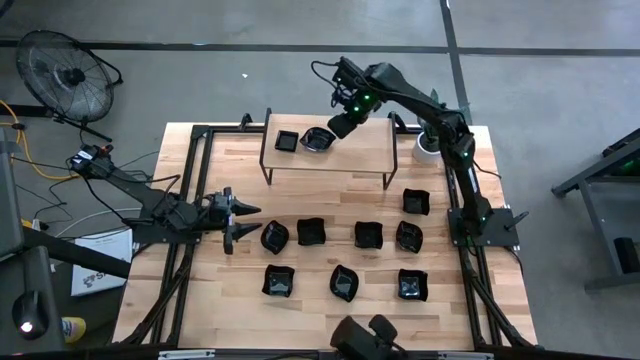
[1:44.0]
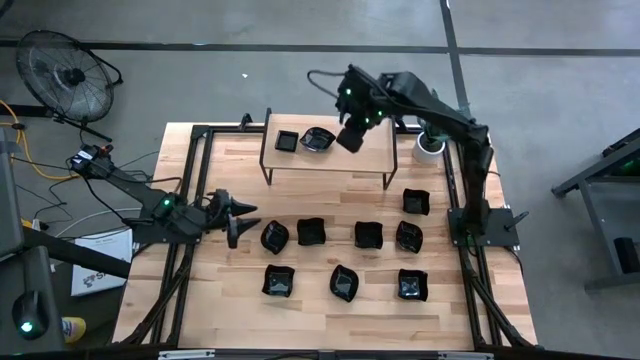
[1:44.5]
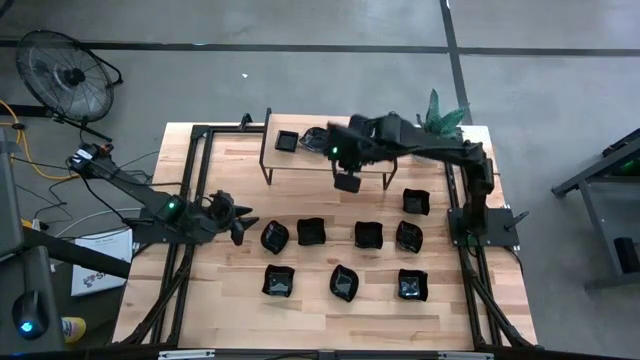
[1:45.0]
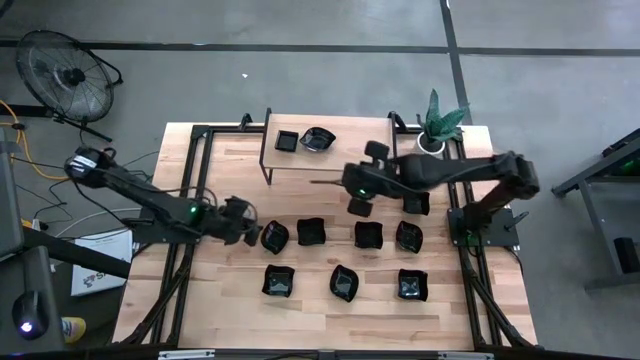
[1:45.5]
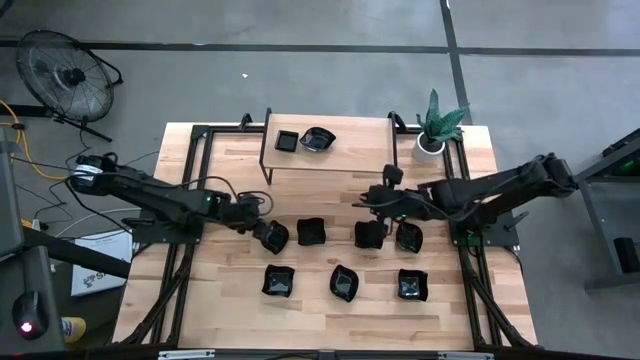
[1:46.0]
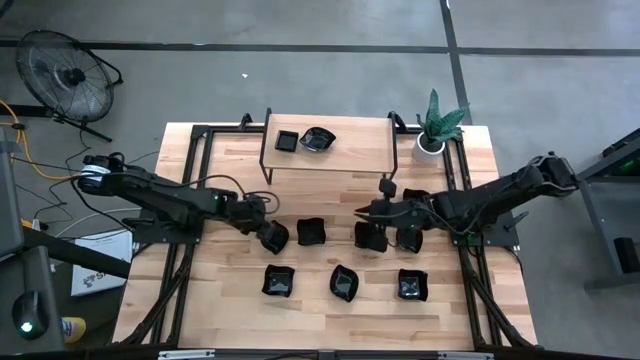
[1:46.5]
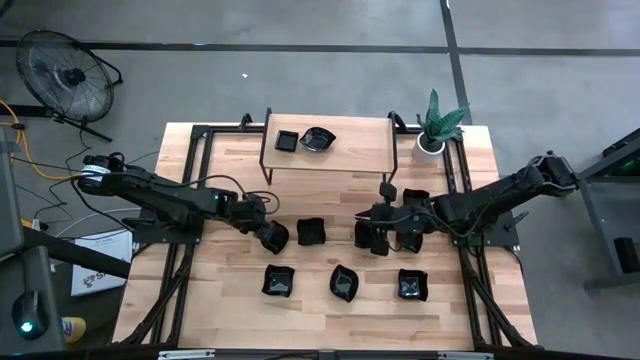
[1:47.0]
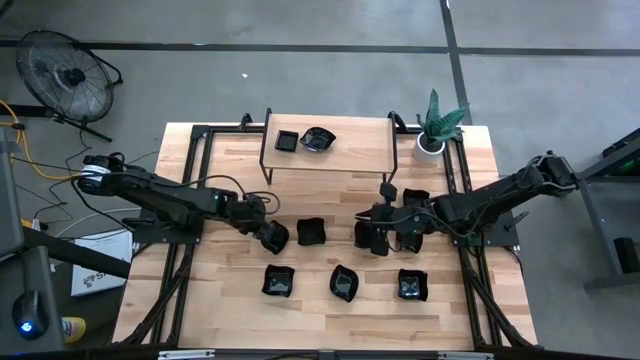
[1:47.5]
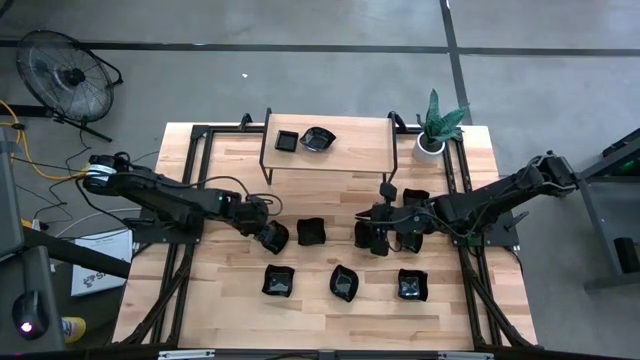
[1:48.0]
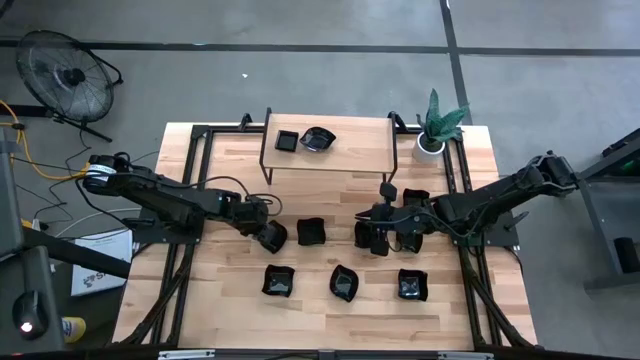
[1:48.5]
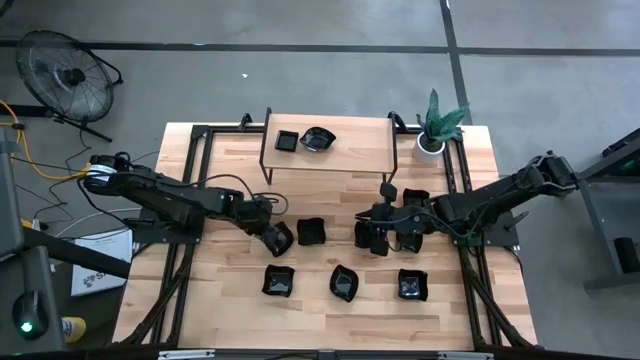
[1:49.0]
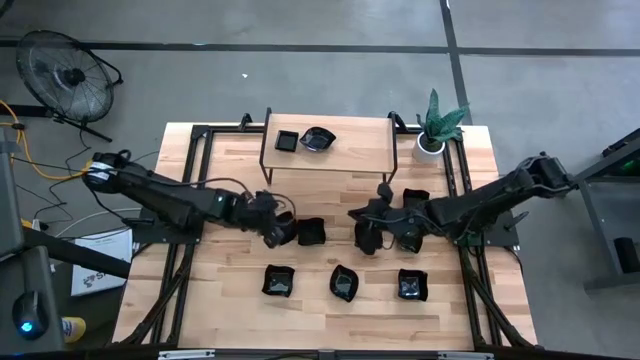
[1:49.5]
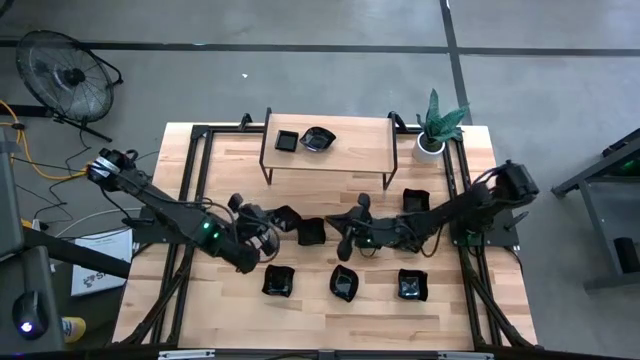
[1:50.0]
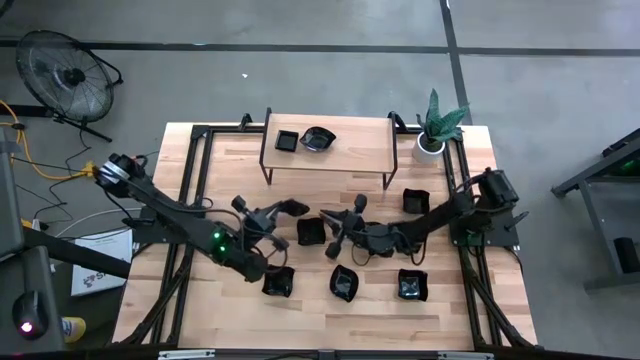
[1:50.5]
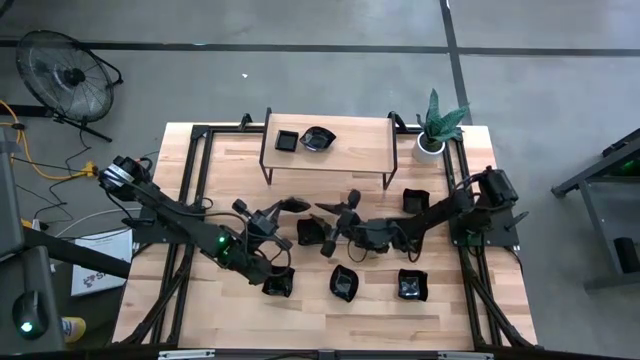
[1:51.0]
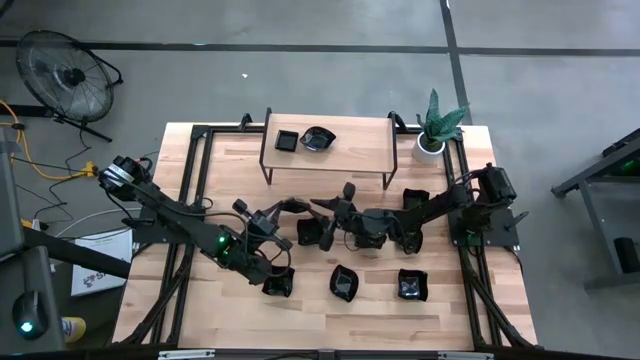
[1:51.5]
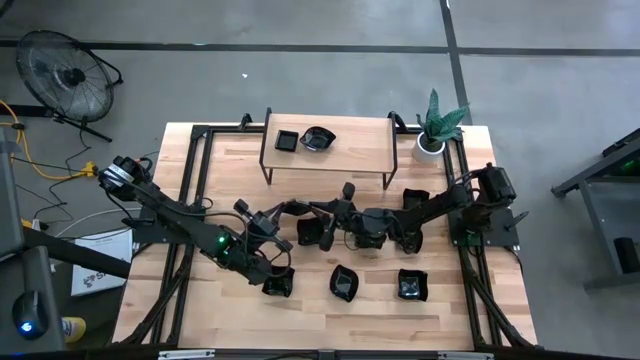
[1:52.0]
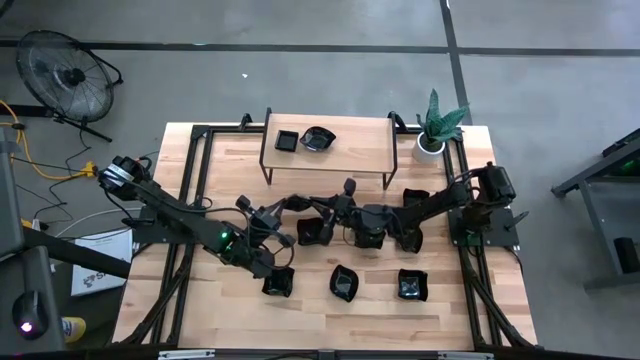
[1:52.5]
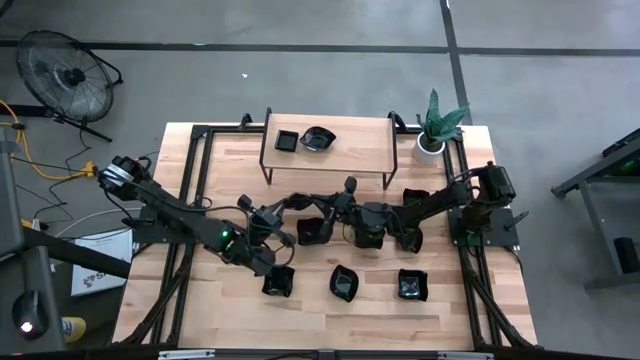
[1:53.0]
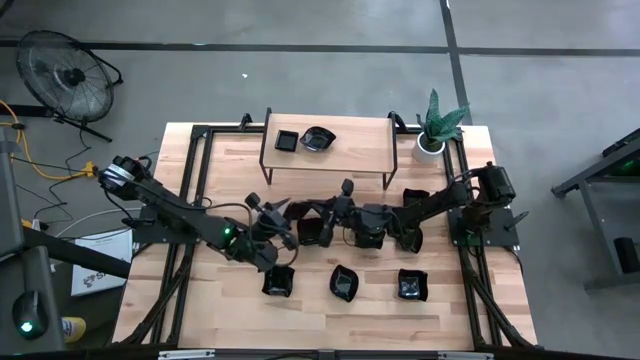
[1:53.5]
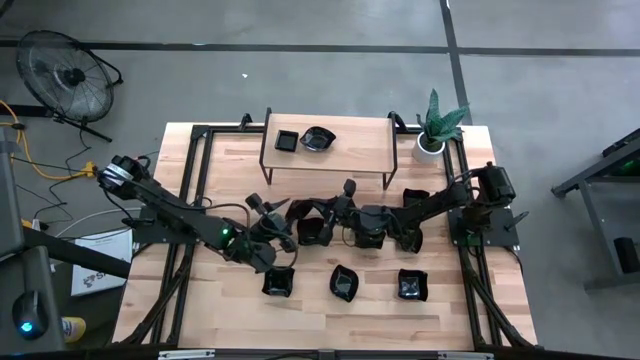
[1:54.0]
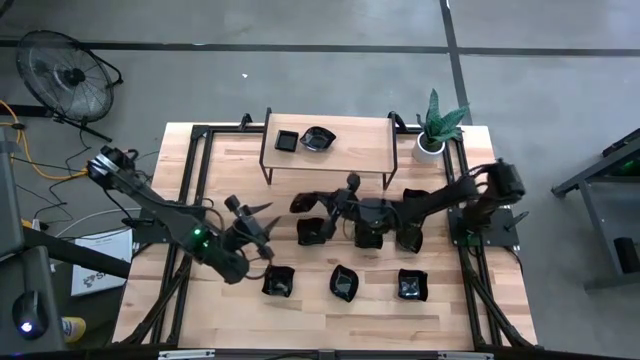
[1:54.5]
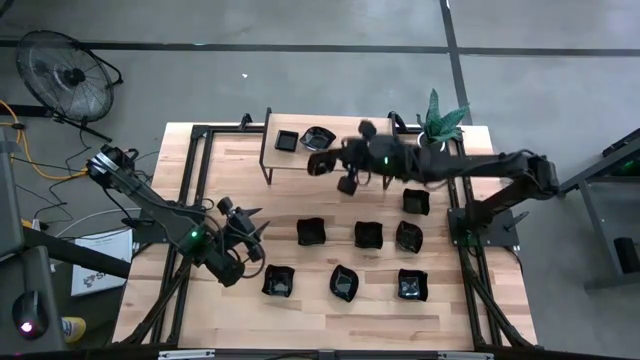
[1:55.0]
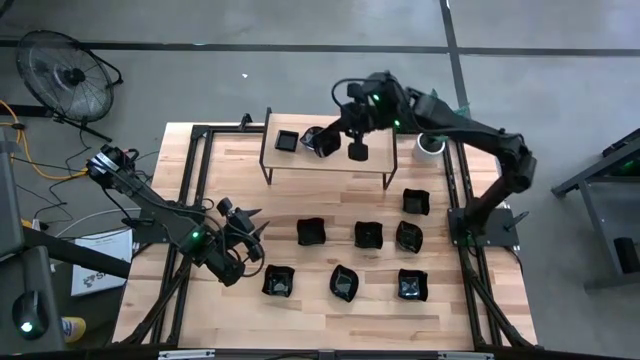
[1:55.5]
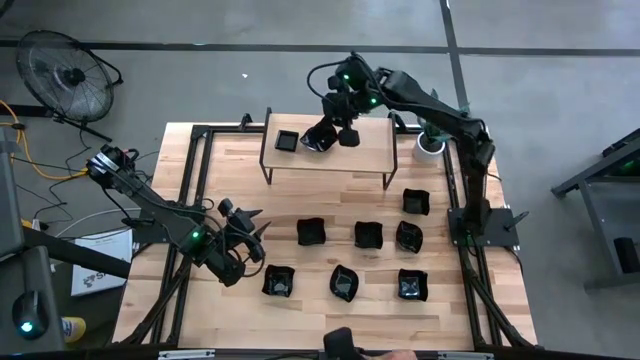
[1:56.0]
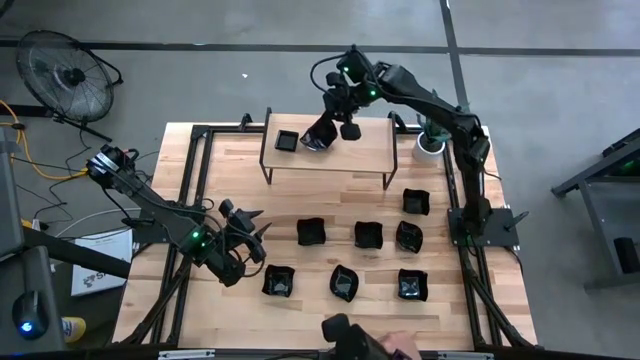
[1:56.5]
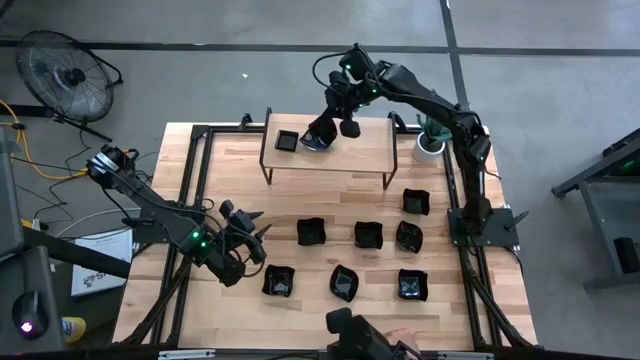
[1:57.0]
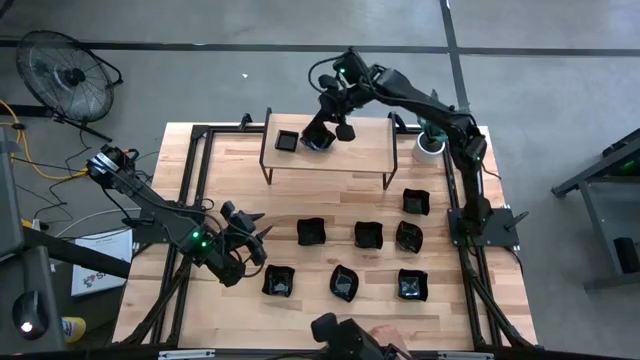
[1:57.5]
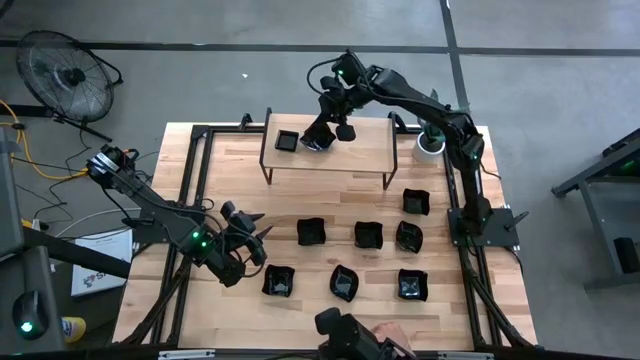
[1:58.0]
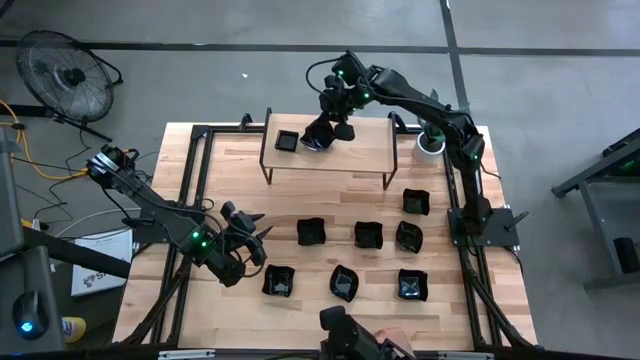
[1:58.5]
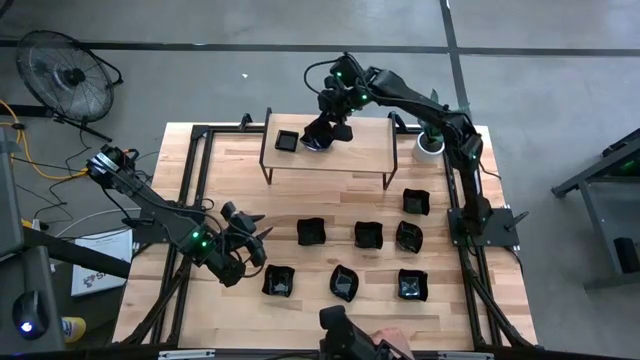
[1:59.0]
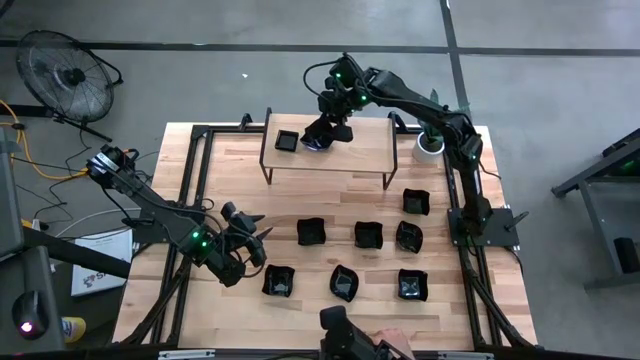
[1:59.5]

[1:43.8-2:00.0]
Task: Pick & Place Mini shaped plates
Stack the black leaf-shaped plate on top of the black leaf-shaped plate on the shelf

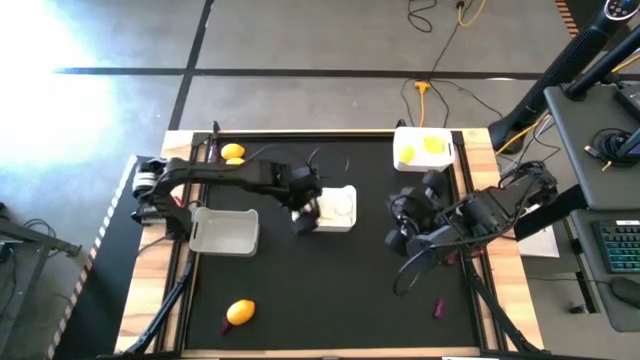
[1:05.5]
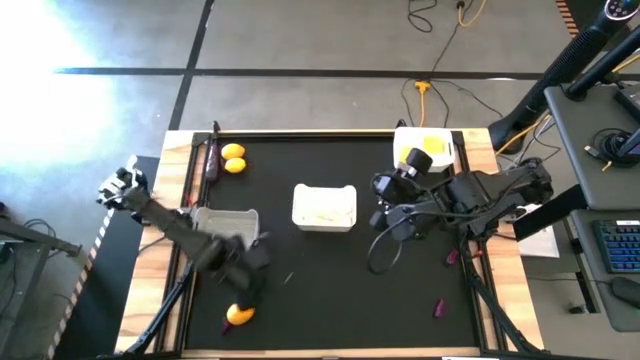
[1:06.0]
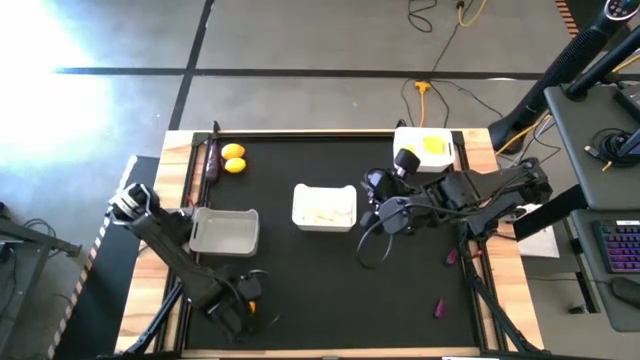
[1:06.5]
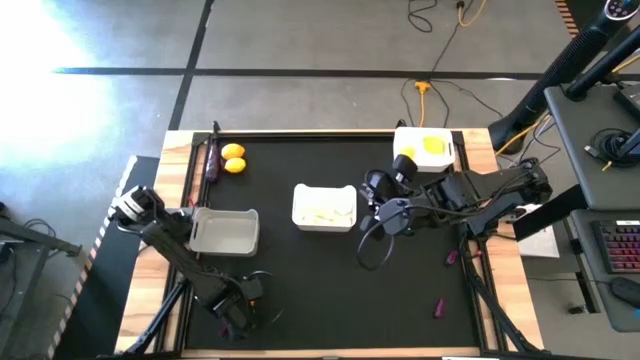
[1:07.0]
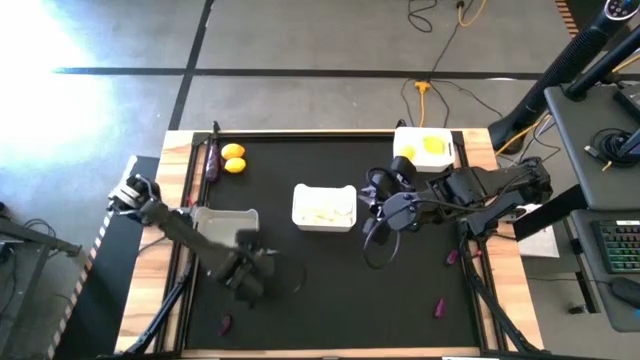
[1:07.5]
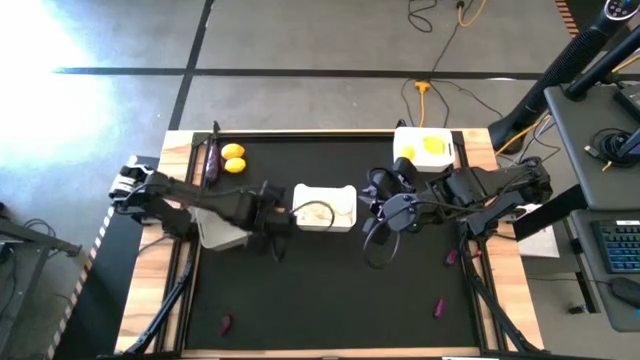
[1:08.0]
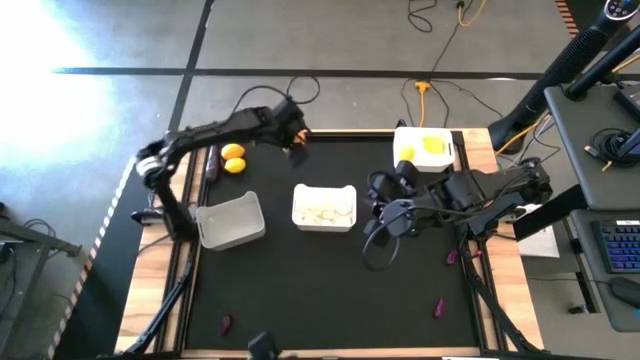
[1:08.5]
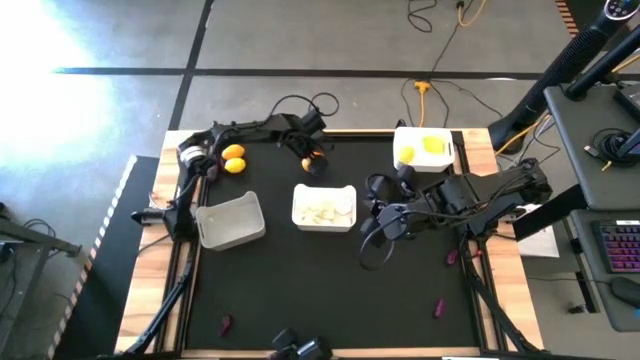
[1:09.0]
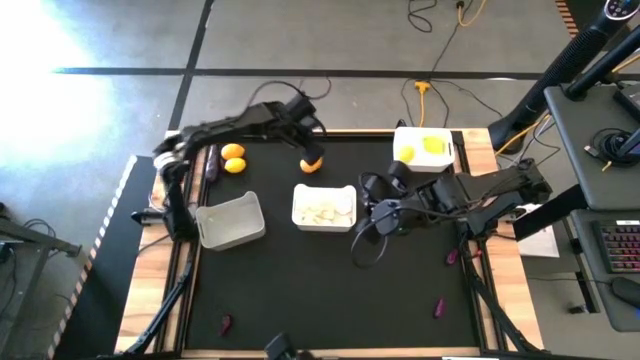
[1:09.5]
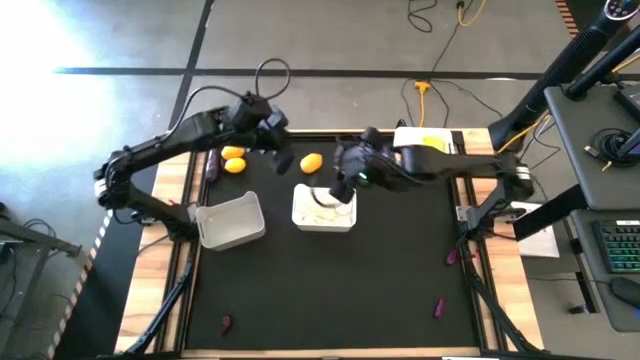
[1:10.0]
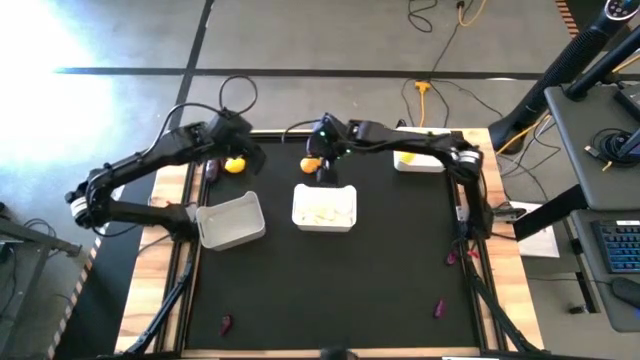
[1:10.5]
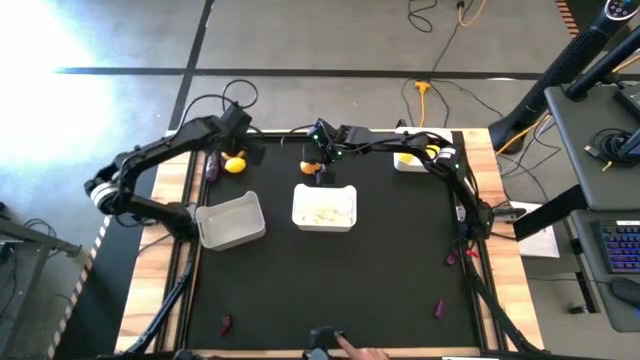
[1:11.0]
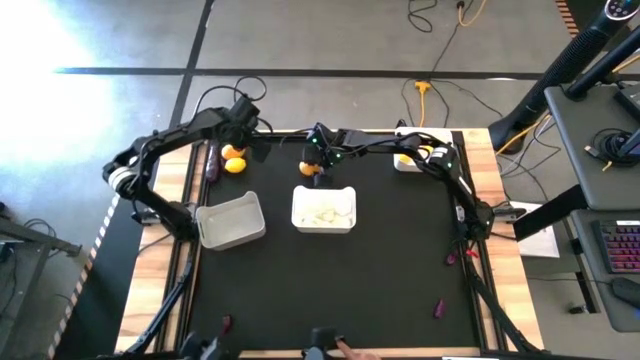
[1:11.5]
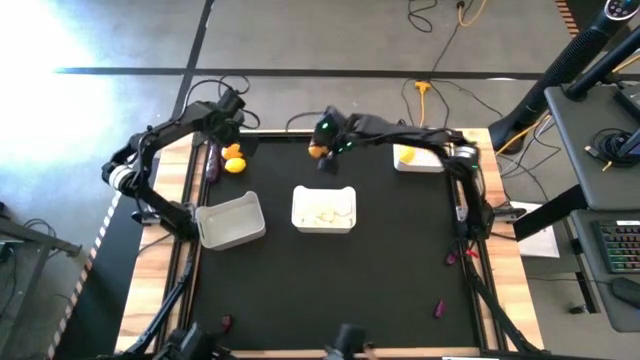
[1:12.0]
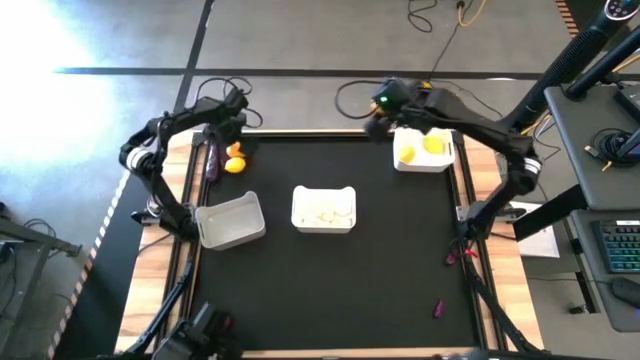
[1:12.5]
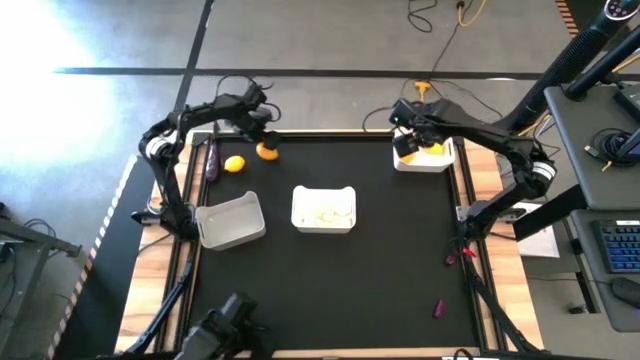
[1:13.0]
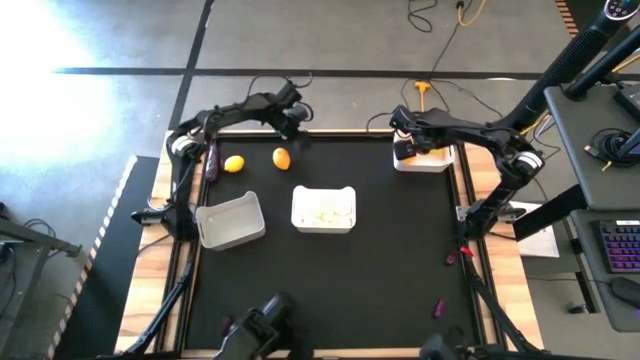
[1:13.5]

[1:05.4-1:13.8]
Task: Sort produce into baskets
Put the yellow lemon into the top white bin
